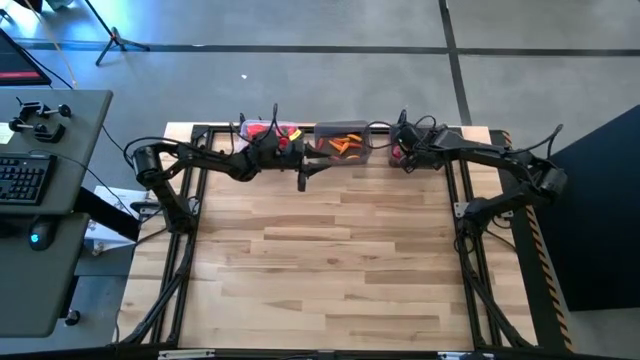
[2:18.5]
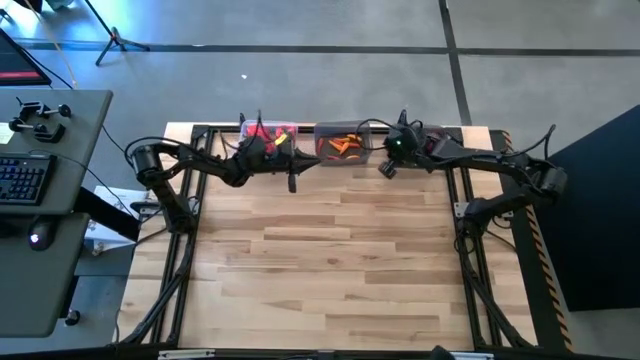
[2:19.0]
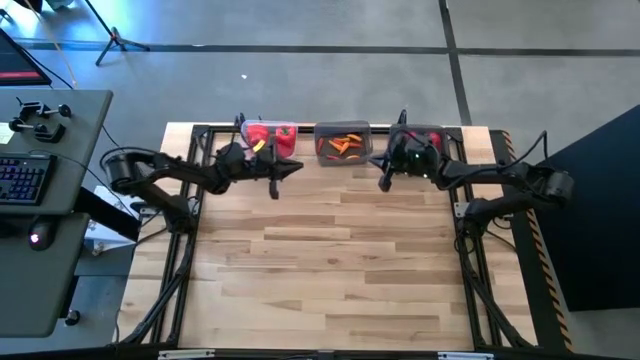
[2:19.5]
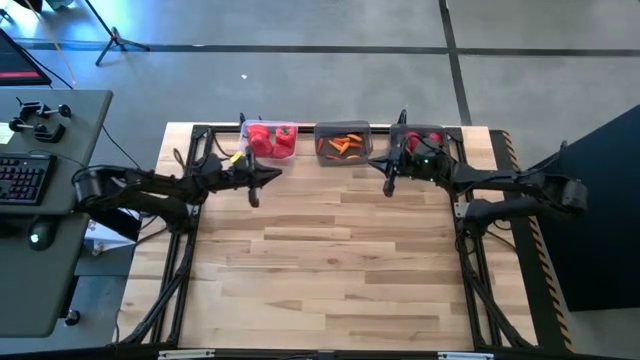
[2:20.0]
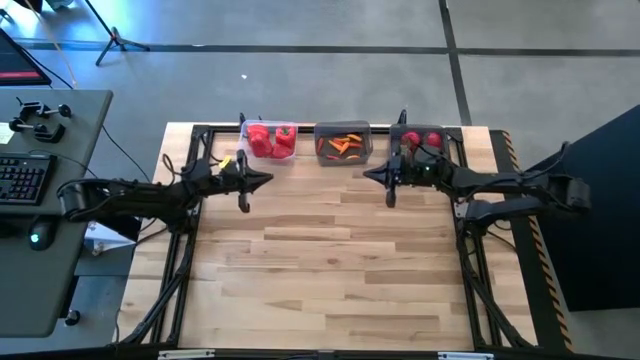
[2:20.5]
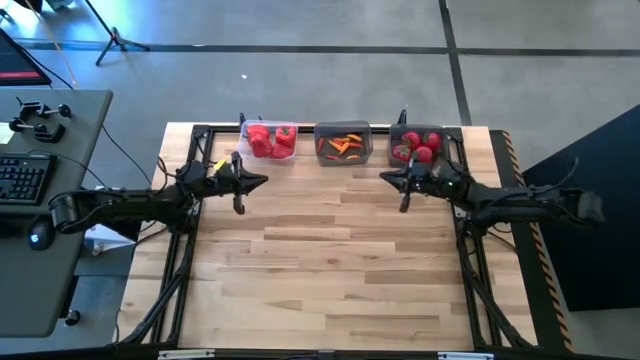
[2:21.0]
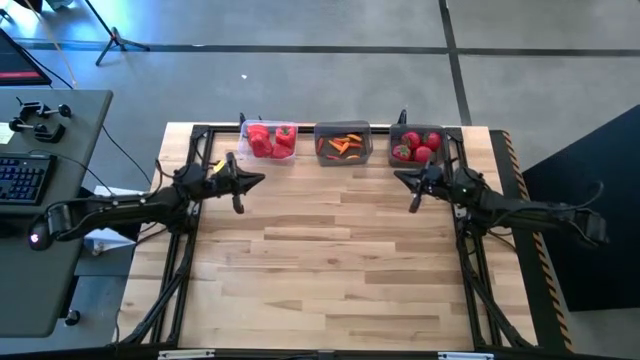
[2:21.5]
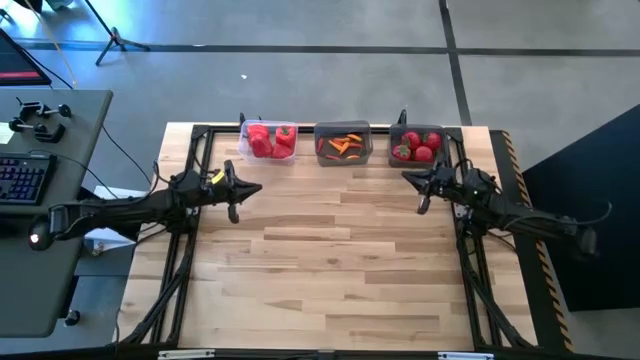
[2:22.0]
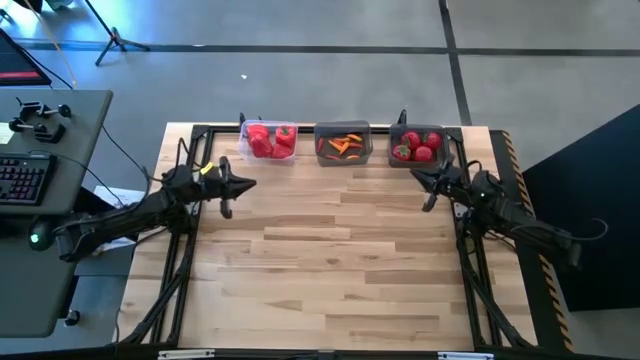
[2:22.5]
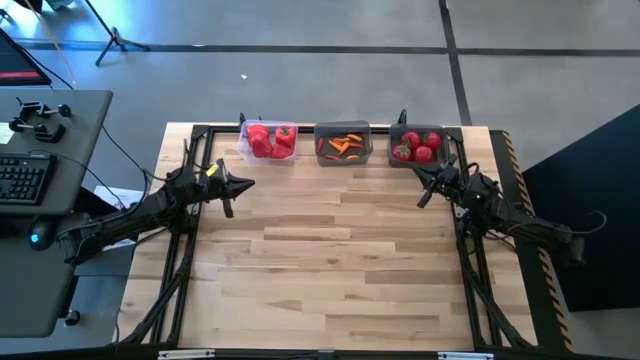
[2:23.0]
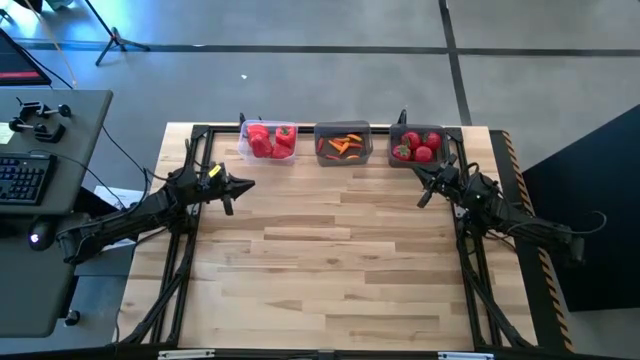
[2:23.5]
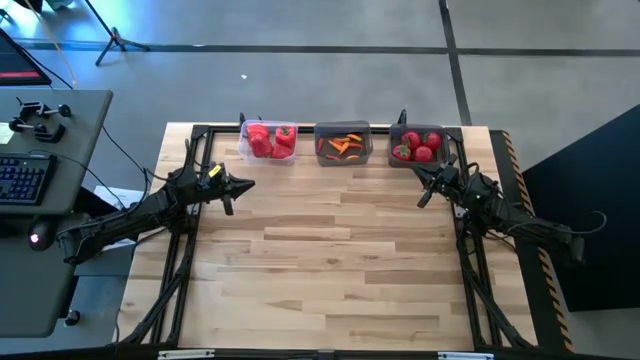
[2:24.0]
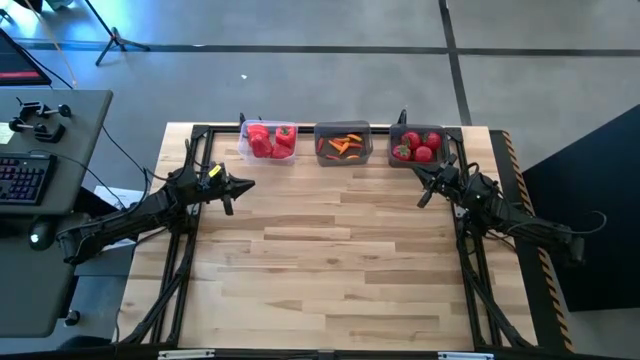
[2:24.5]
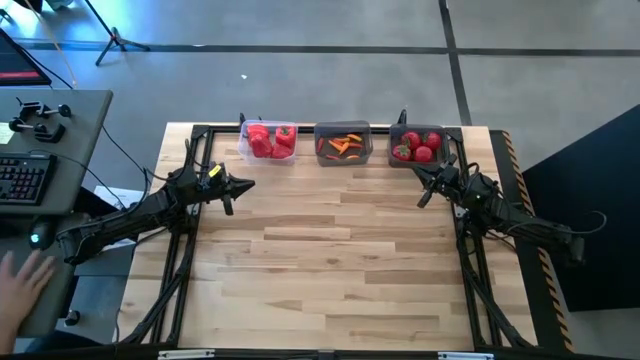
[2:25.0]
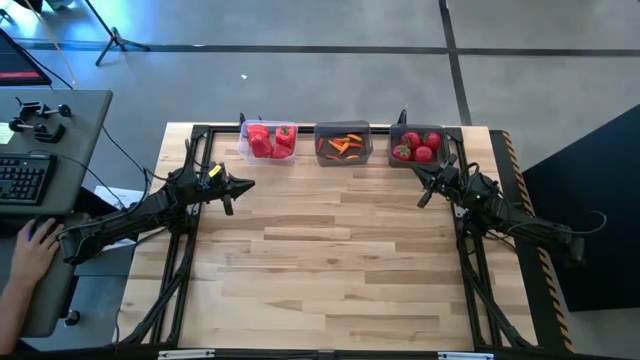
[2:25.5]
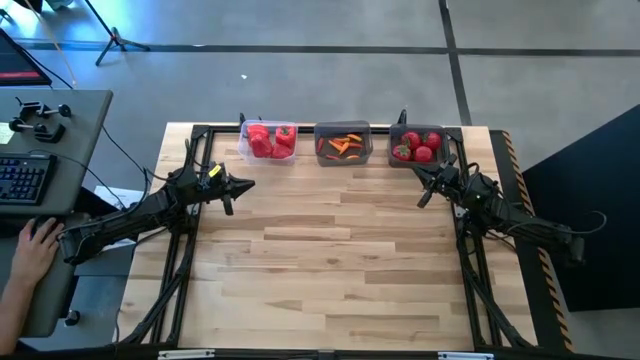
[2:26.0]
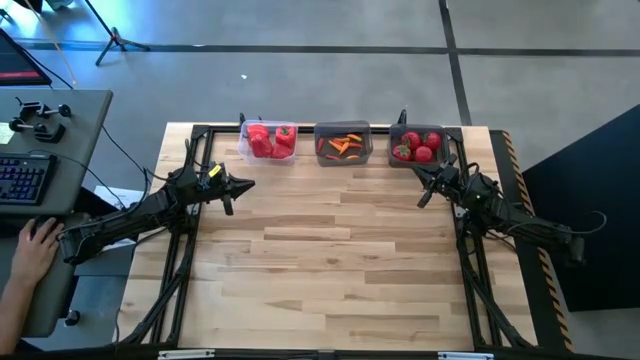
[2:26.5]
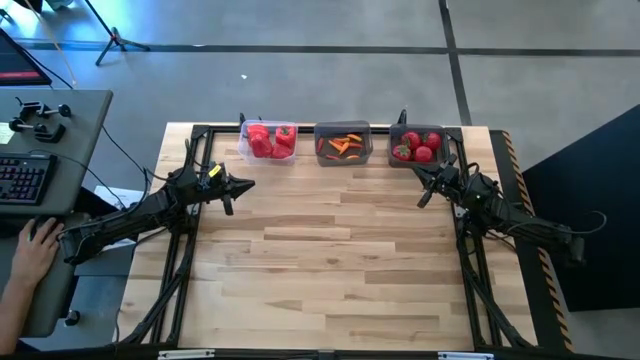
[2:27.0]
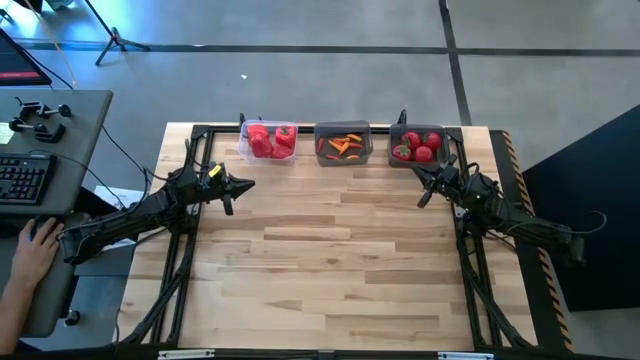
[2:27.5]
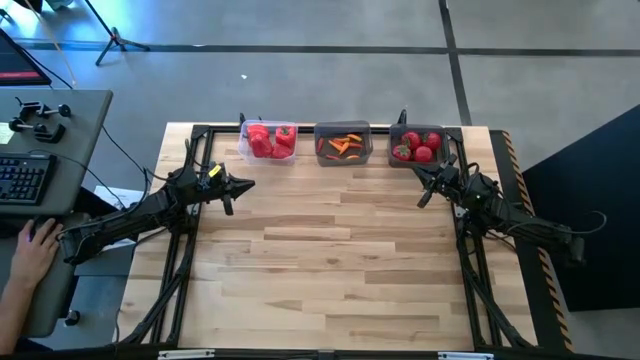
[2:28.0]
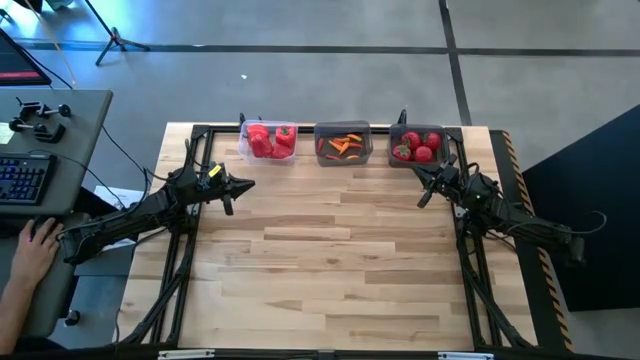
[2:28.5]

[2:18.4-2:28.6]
Task: Sort produce into baskets
Return to Home Position

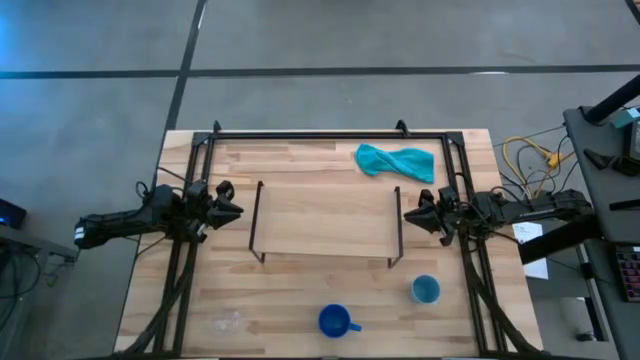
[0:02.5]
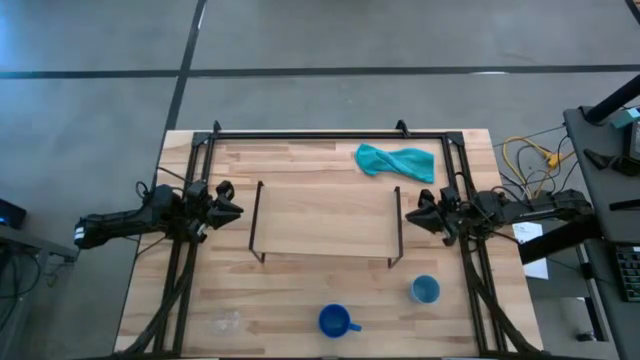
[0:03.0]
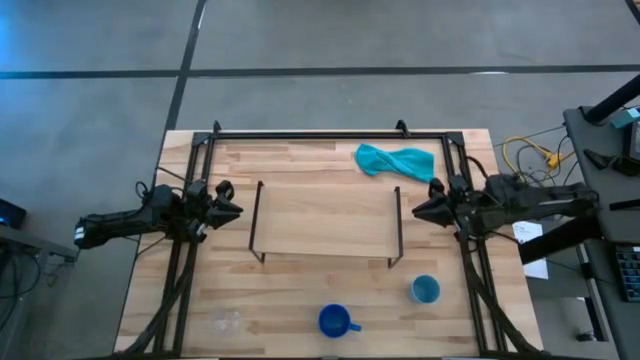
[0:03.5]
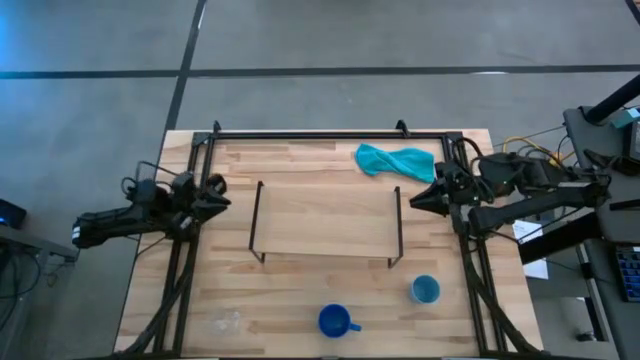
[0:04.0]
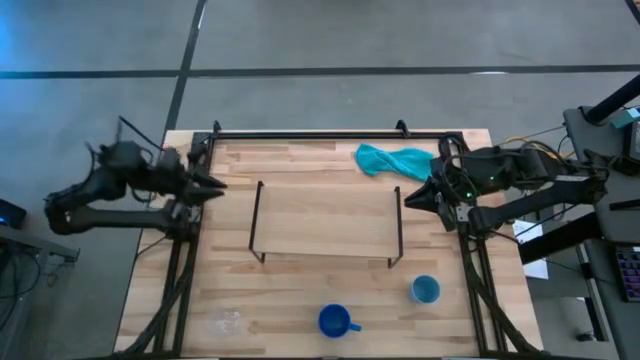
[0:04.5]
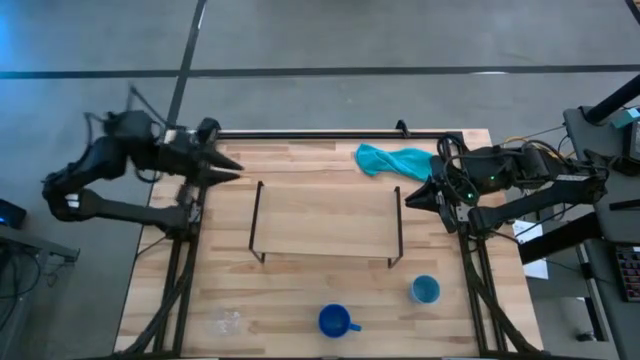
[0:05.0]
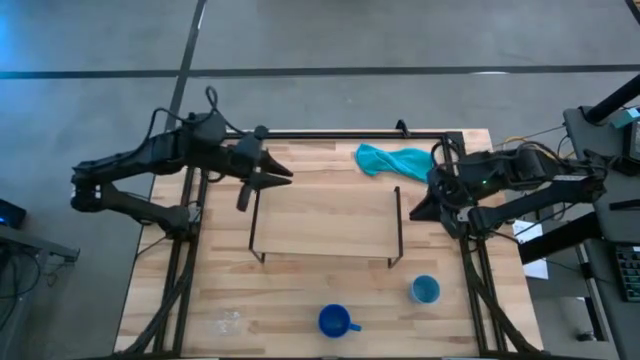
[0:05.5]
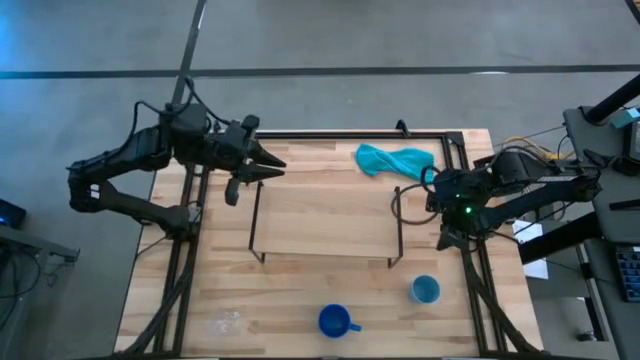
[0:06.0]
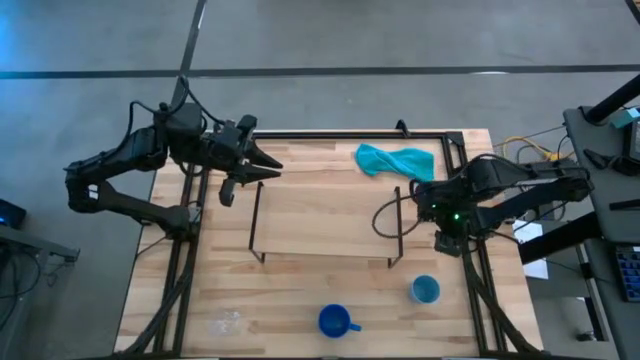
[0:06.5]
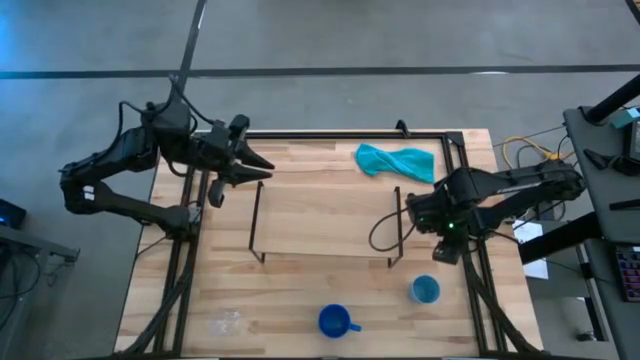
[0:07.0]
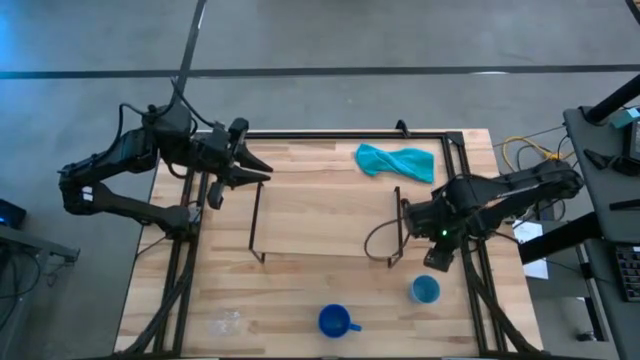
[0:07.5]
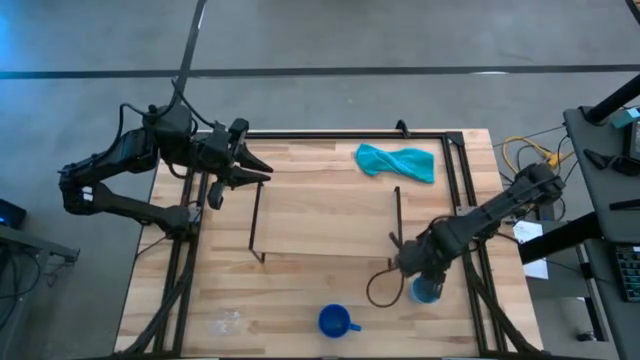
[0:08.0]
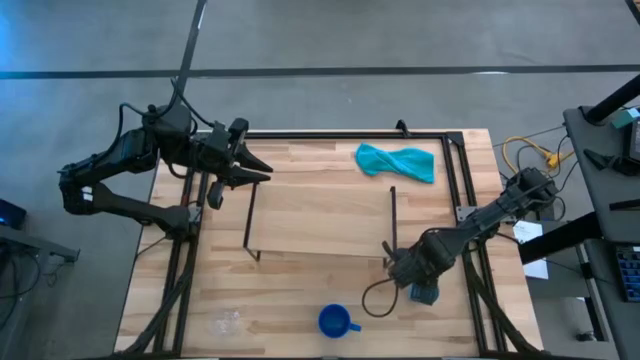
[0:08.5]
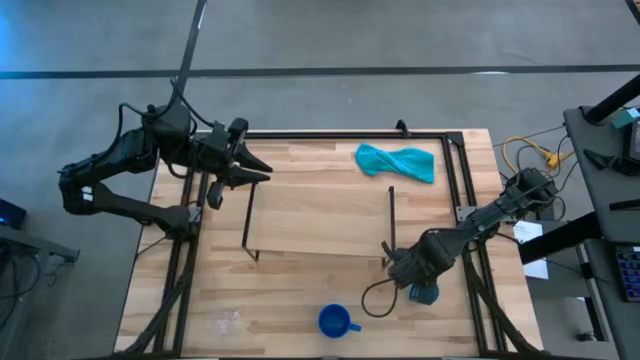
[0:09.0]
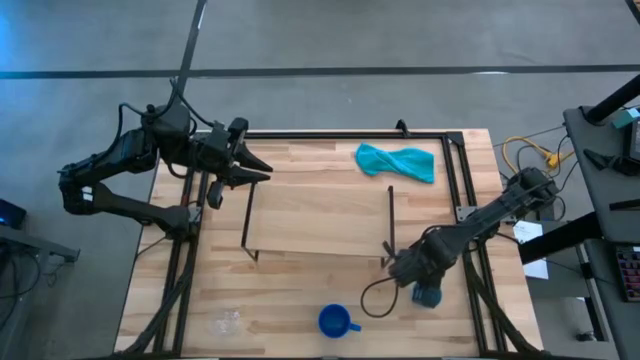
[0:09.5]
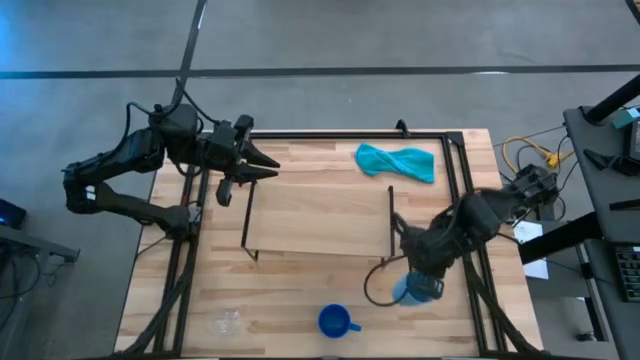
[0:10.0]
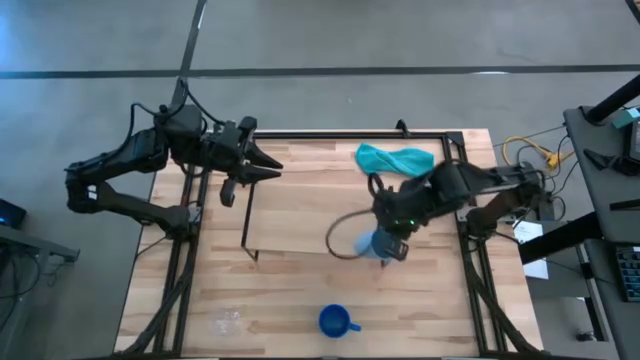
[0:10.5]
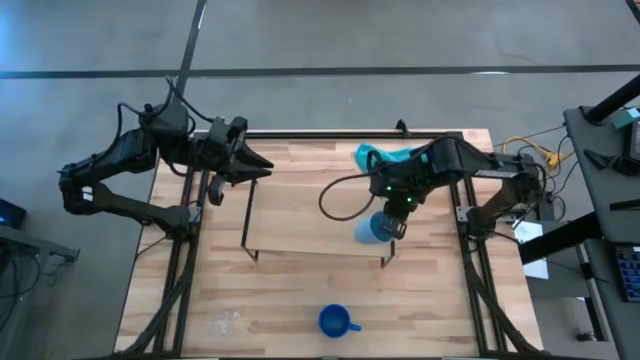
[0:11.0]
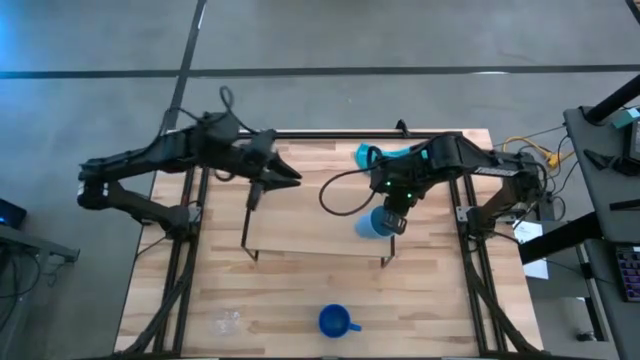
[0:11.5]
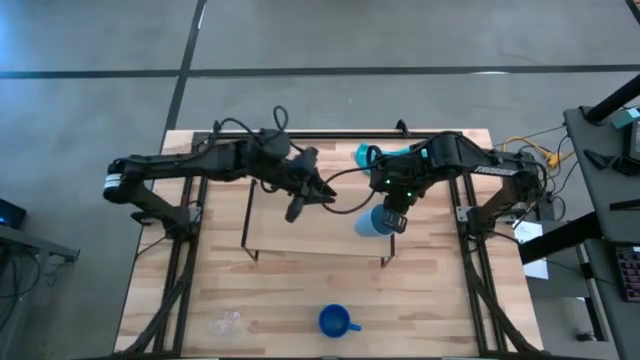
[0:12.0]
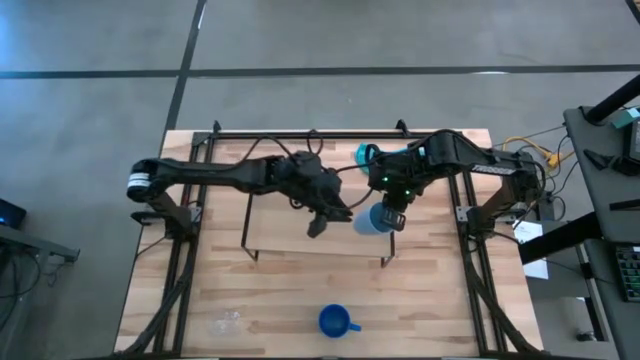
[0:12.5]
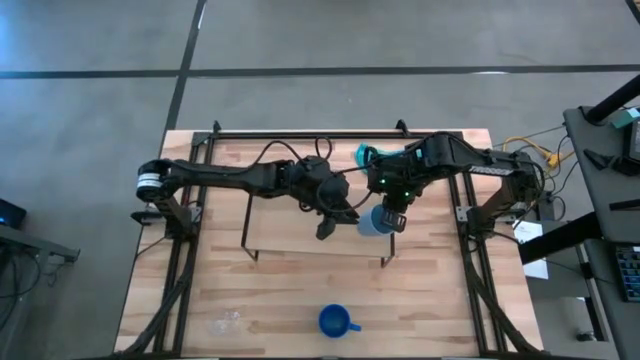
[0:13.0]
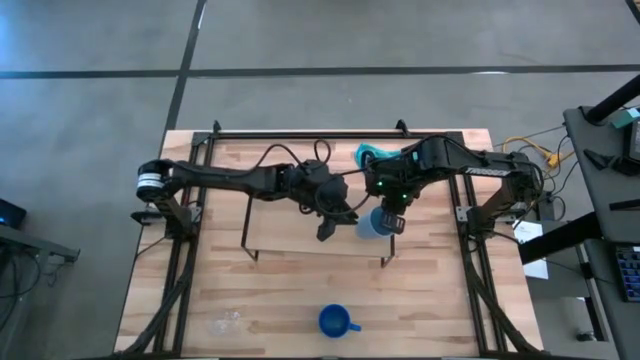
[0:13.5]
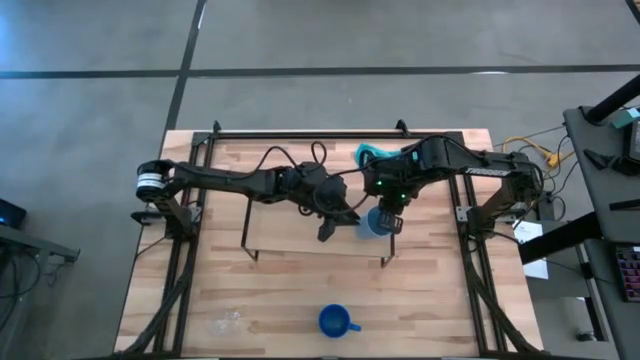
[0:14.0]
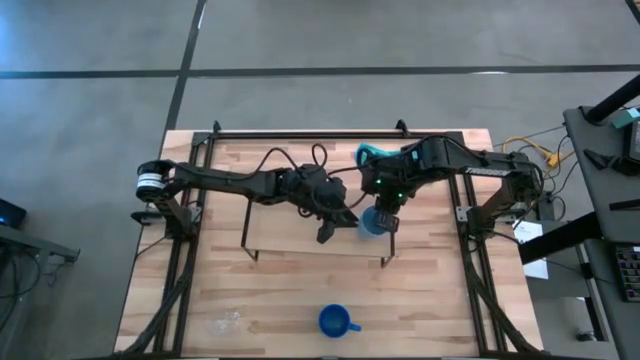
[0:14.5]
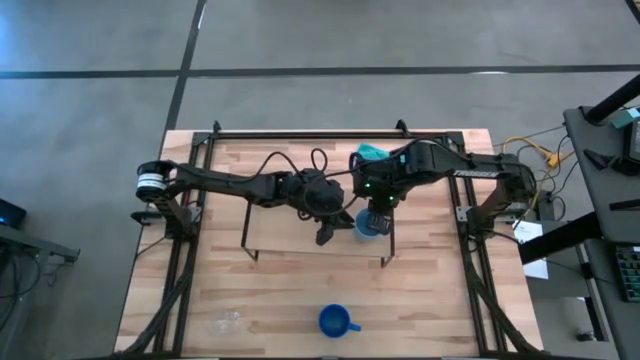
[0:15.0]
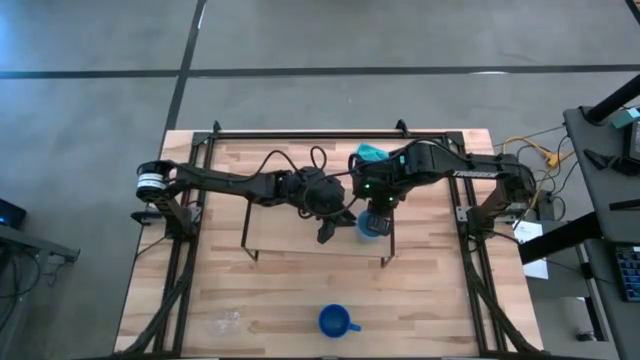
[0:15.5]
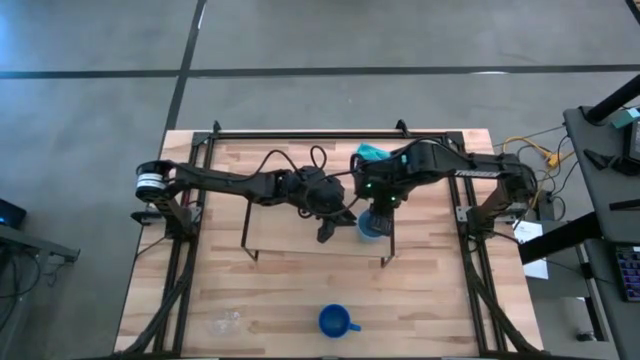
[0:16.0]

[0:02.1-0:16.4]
Task: Stack small to large cups/mugs on shelf
Put the light blue cup on the shelf
